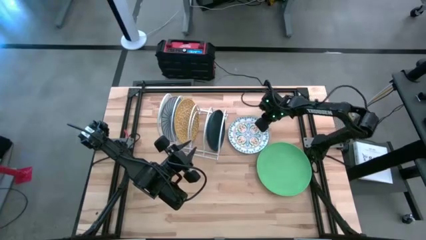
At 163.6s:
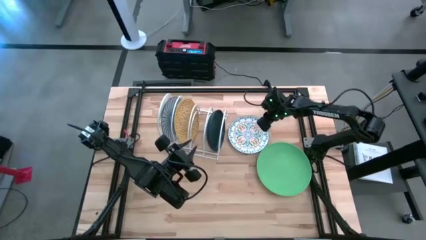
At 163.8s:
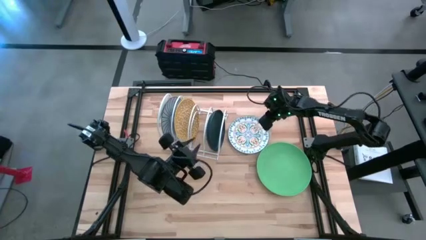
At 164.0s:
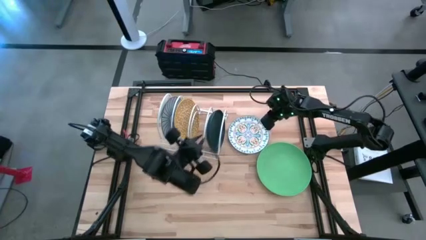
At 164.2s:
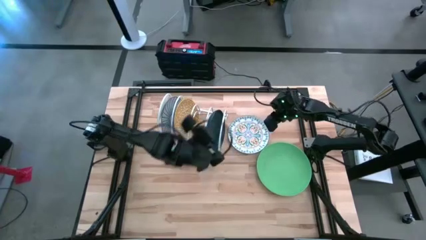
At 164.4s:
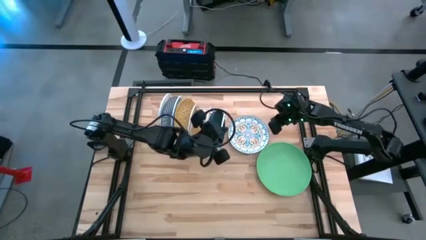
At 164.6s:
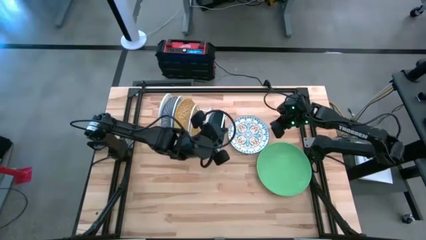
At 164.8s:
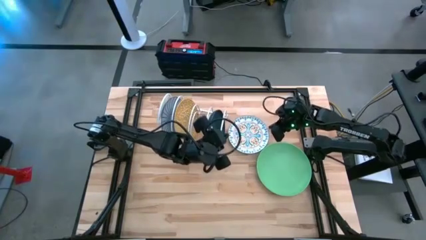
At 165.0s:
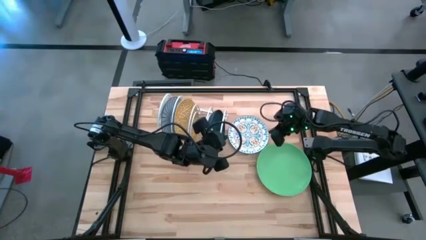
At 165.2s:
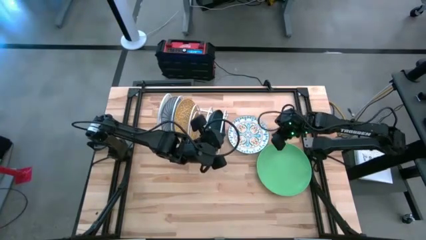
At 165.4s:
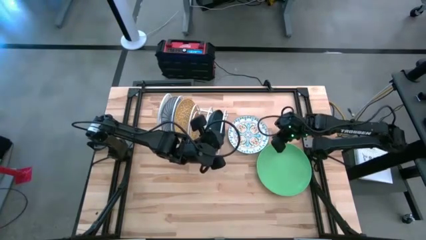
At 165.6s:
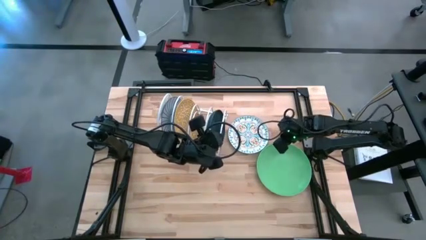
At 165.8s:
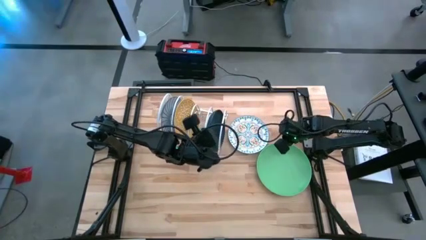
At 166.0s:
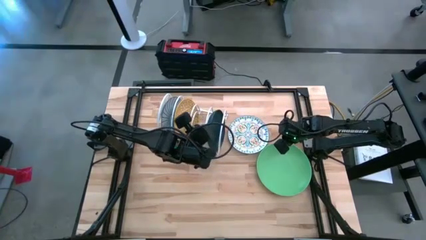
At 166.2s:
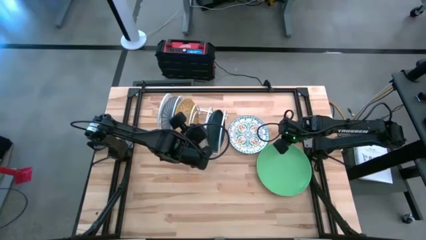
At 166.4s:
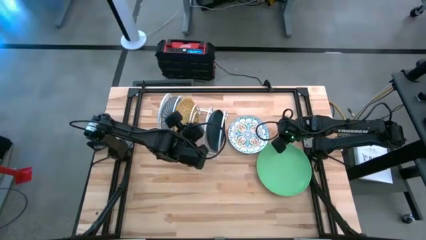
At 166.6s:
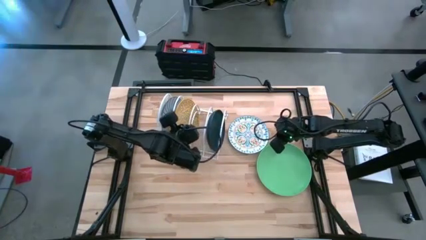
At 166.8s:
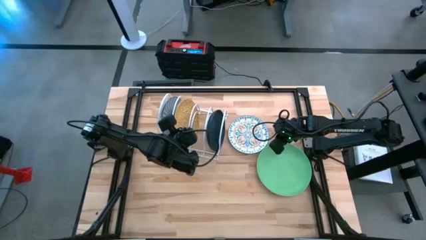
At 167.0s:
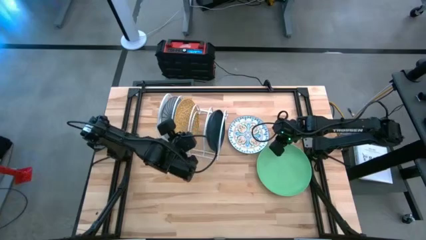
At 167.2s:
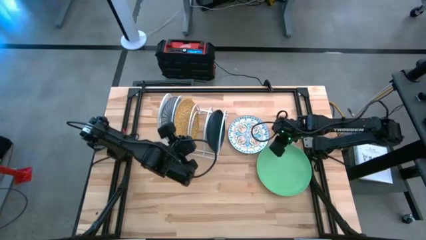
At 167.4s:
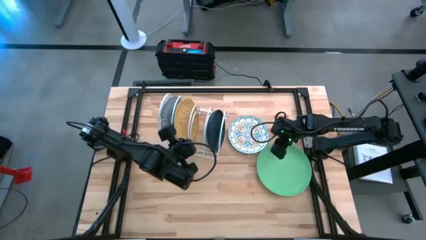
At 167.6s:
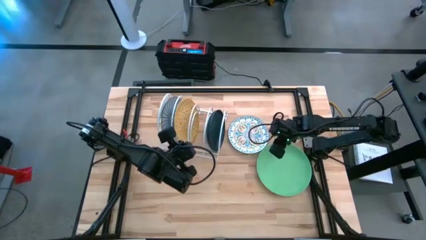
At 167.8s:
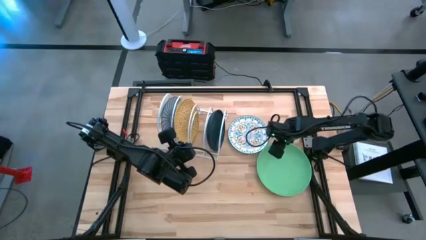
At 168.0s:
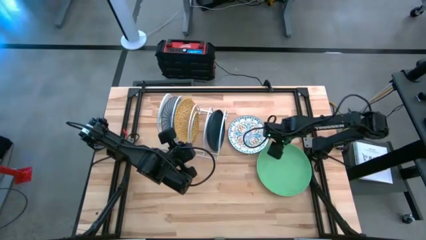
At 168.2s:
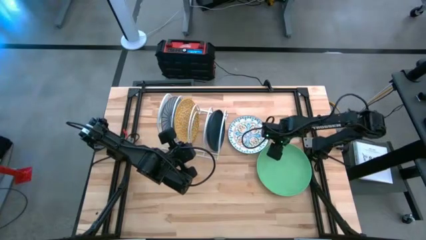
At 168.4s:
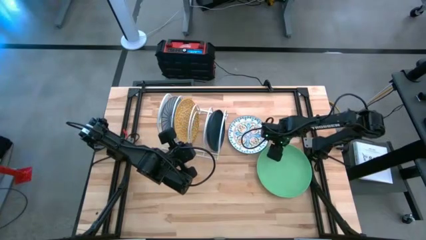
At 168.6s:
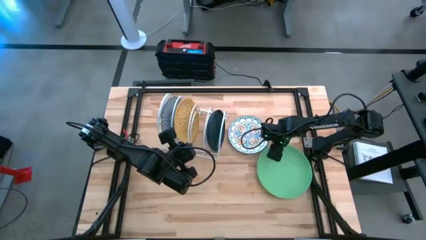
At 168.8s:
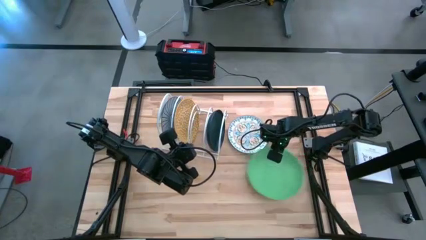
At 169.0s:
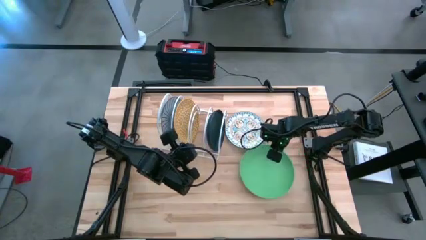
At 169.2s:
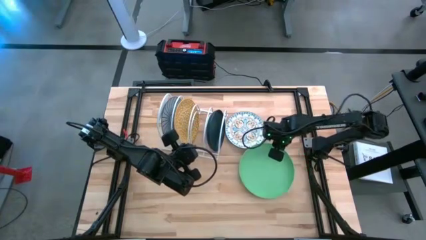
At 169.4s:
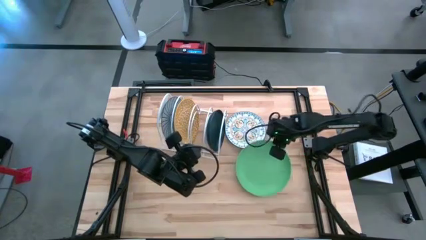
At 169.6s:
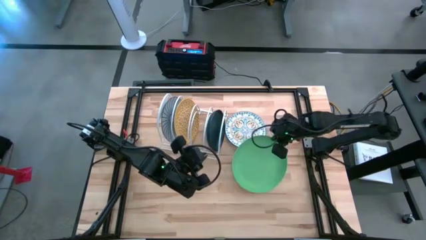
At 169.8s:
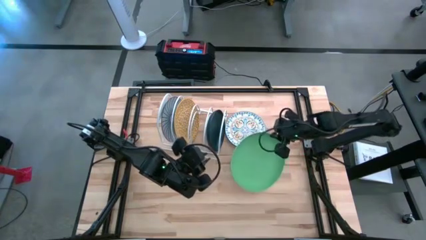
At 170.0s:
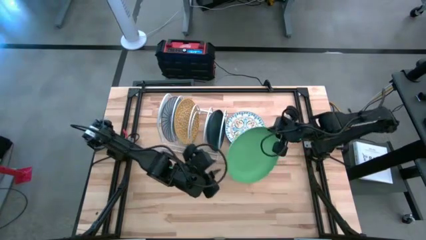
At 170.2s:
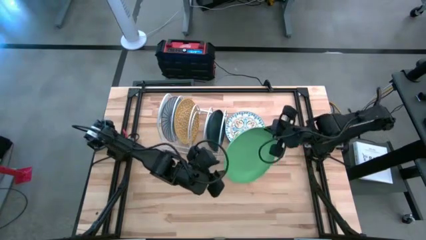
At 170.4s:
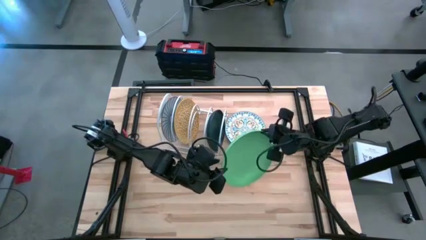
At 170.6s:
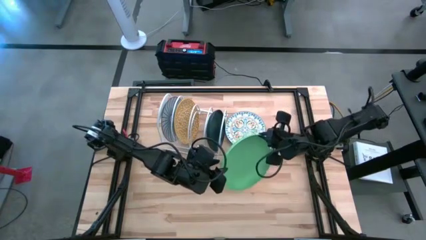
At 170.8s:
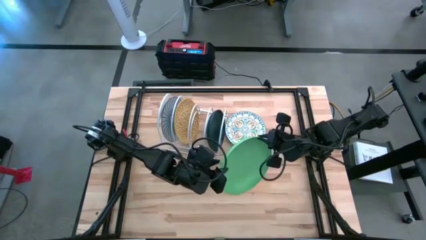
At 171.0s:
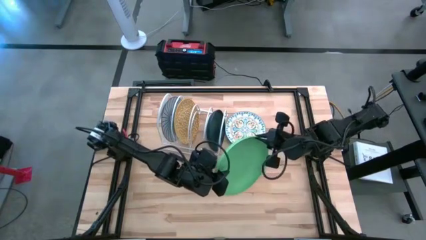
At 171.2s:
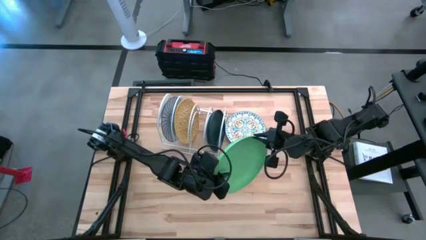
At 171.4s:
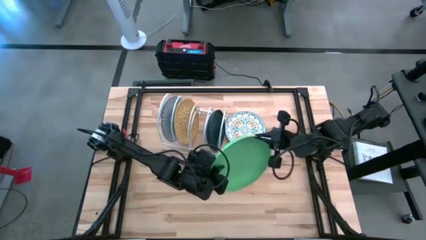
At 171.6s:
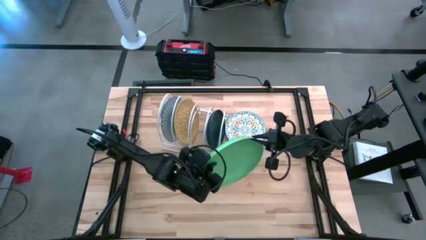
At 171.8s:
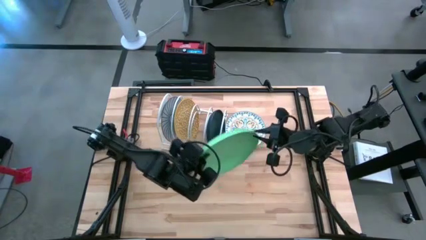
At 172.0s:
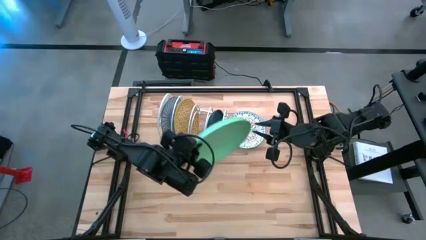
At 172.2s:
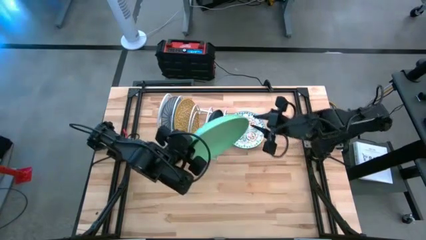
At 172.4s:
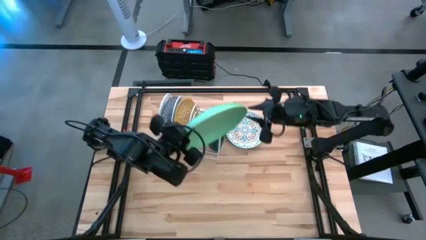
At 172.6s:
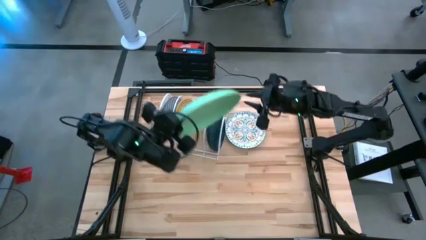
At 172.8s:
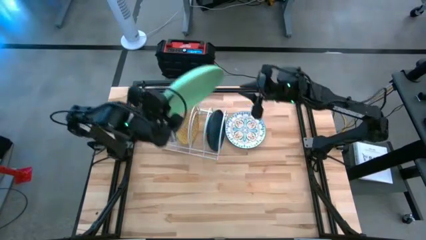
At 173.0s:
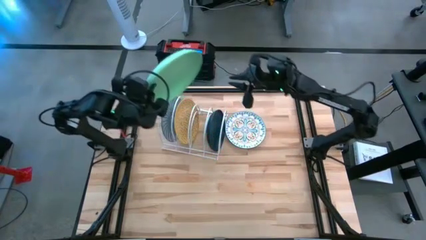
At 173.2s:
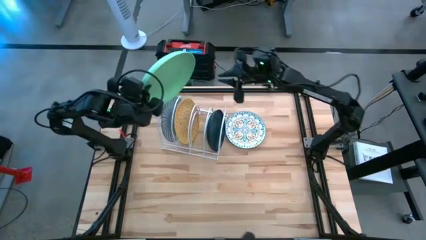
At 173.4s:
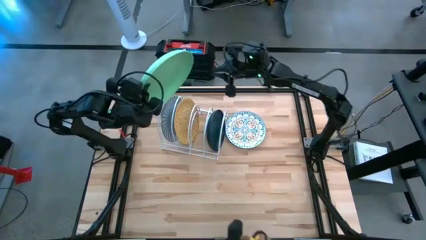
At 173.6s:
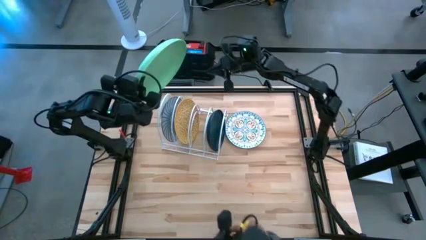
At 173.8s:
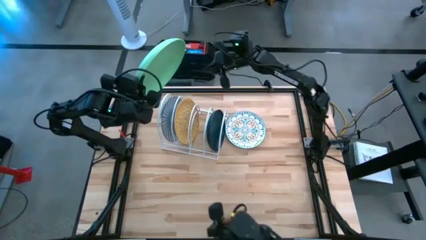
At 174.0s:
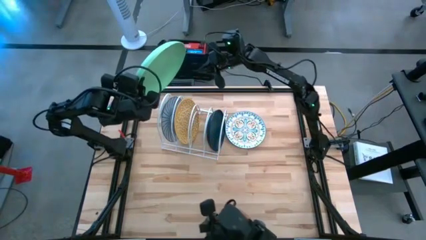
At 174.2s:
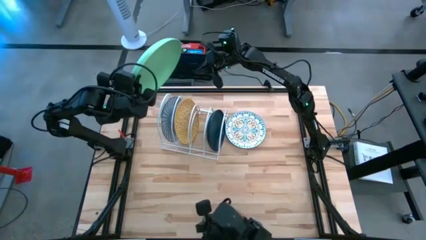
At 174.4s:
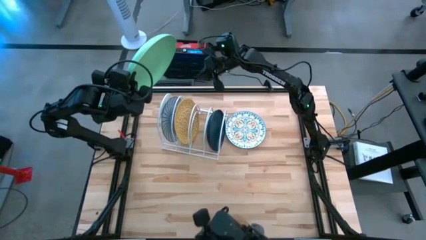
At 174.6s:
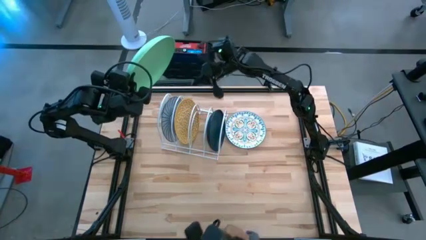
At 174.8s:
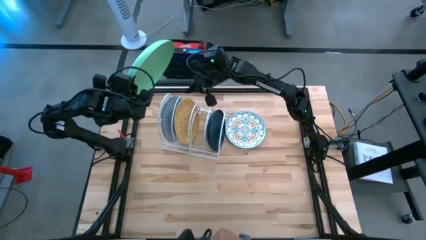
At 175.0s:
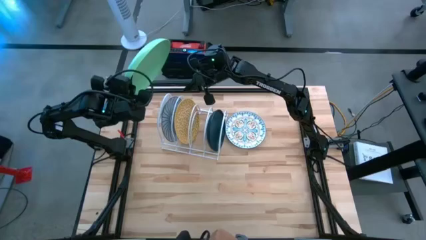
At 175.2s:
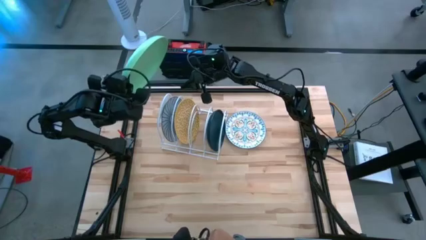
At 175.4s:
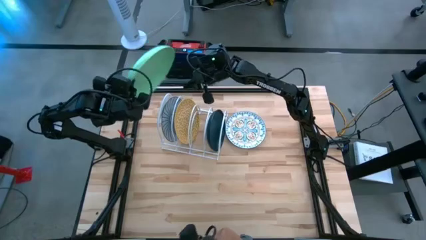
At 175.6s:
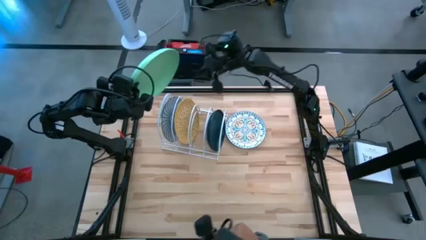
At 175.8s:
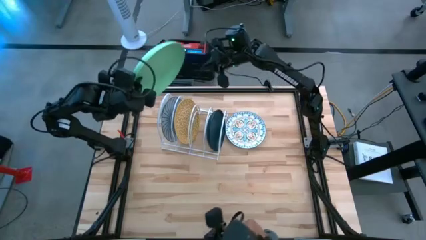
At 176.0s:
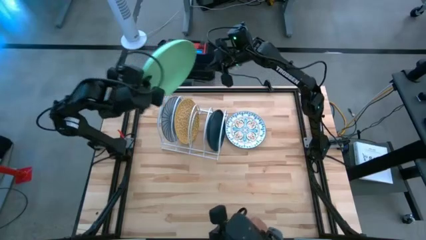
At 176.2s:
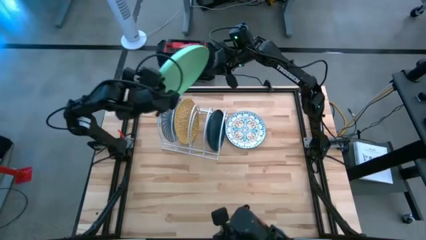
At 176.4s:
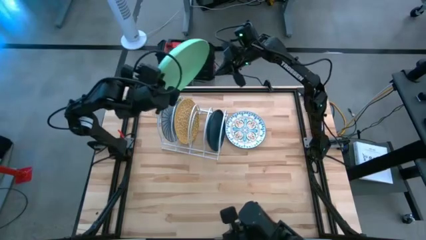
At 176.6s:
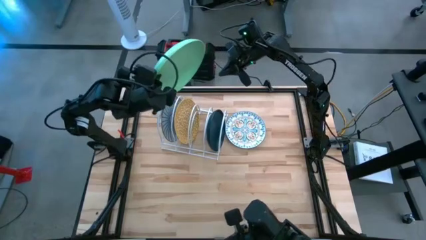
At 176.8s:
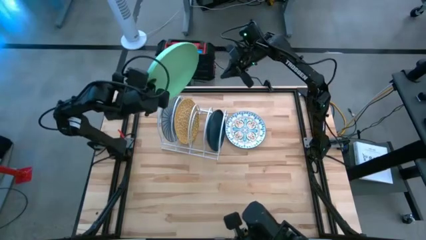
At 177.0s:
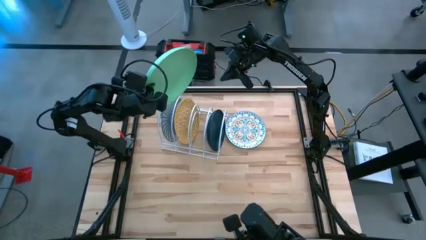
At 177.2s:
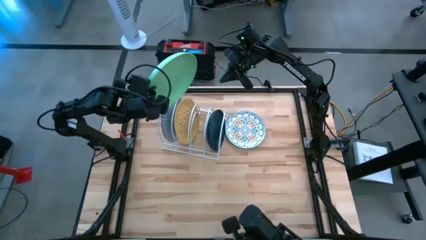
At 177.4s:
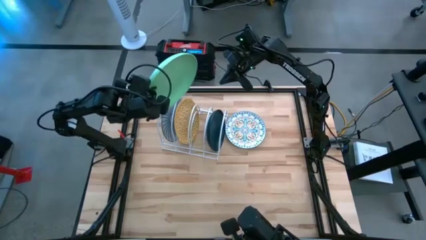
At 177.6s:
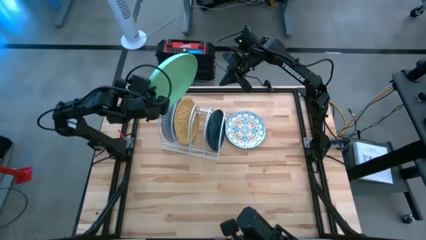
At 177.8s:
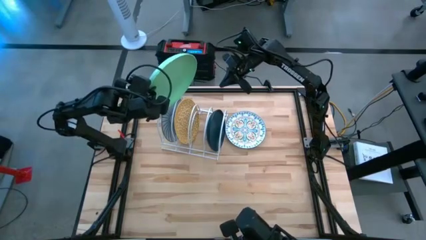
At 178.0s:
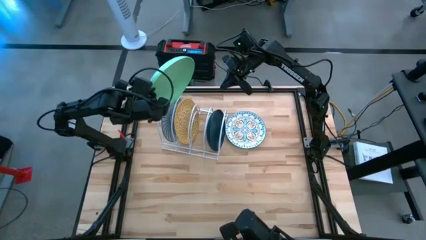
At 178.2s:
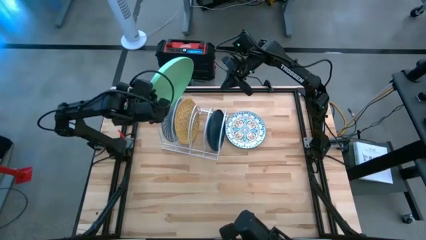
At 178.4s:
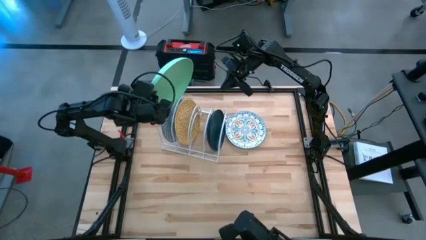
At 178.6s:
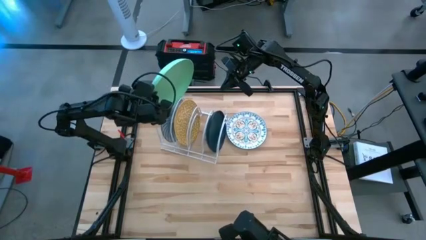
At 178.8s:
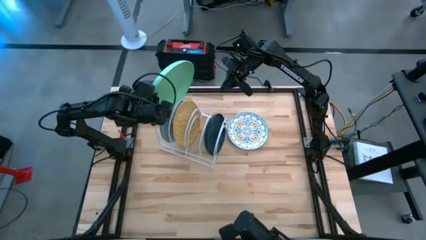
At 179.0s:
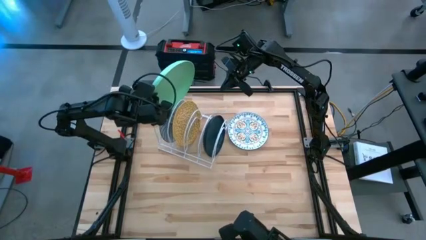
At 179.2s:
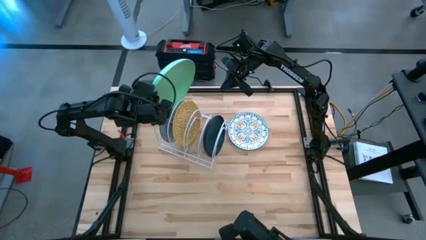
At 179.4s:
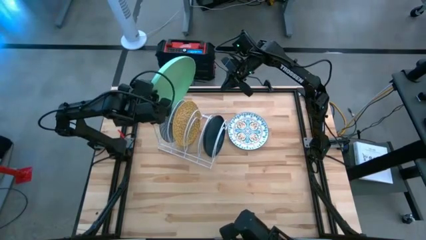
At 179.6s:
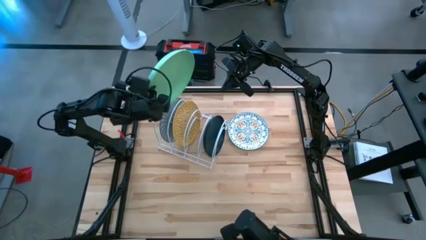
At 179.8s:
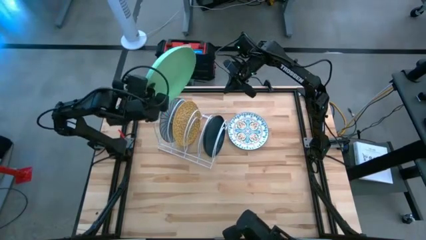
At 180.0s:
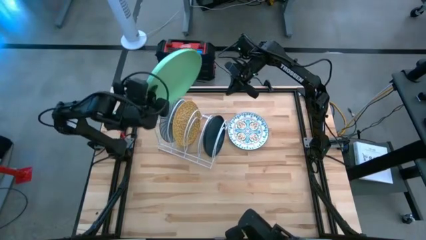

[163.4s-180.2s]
Task: Sort dishes
Put the green plate in the dish rack
